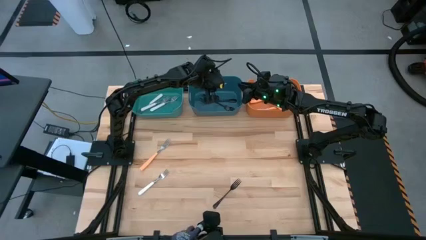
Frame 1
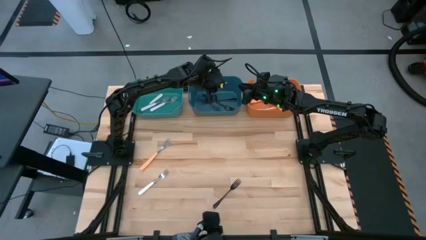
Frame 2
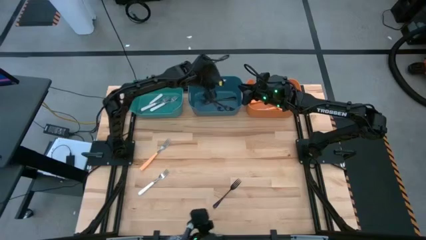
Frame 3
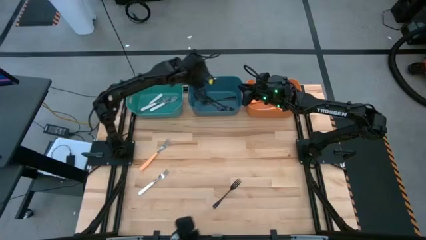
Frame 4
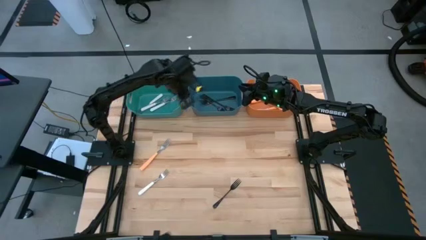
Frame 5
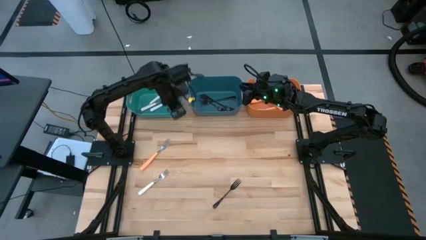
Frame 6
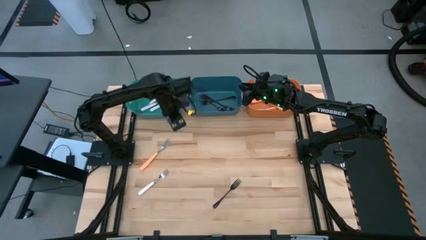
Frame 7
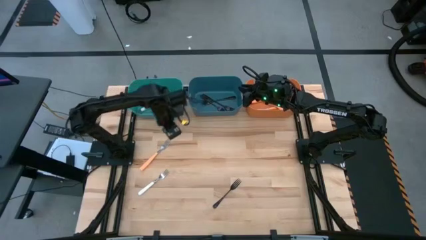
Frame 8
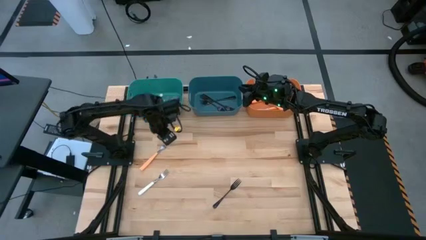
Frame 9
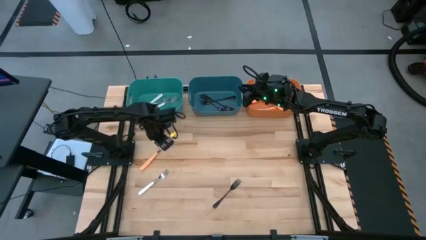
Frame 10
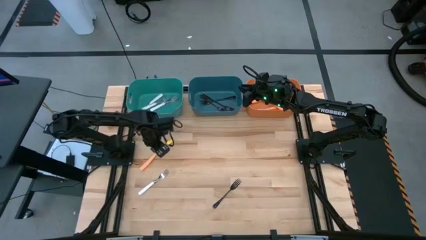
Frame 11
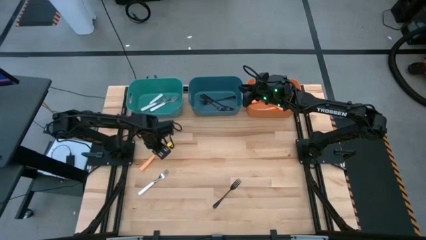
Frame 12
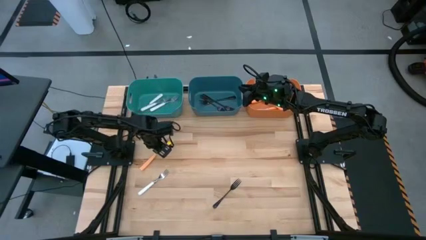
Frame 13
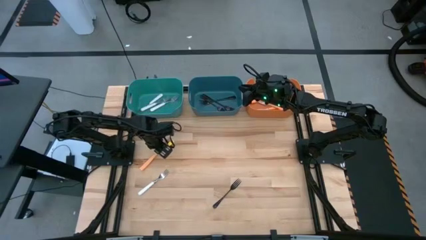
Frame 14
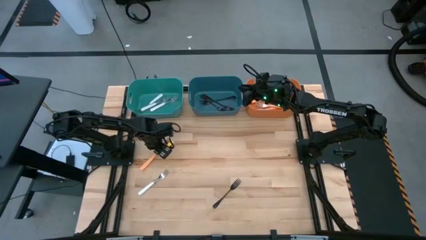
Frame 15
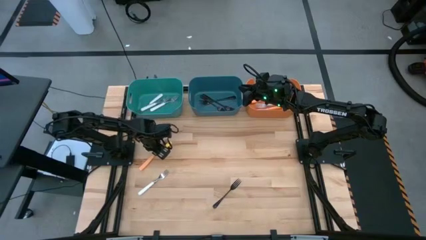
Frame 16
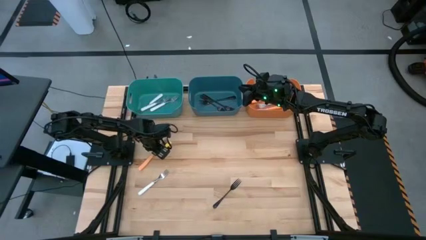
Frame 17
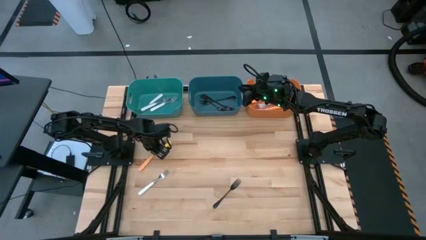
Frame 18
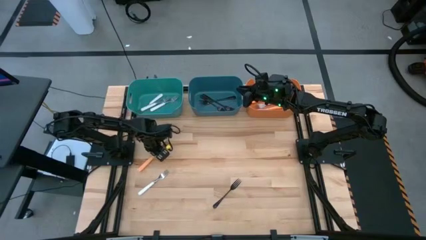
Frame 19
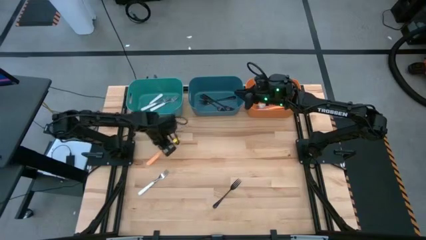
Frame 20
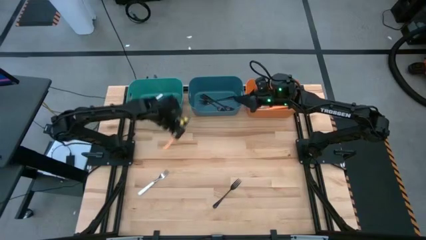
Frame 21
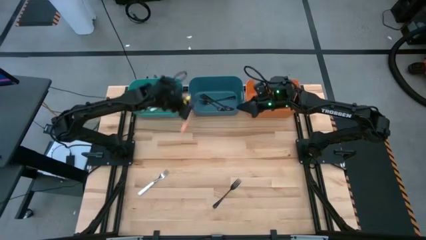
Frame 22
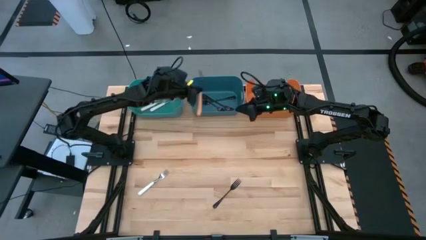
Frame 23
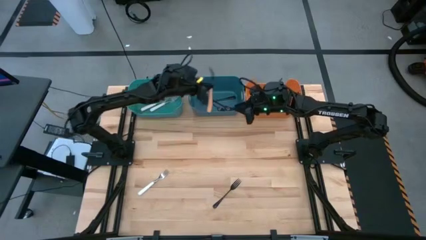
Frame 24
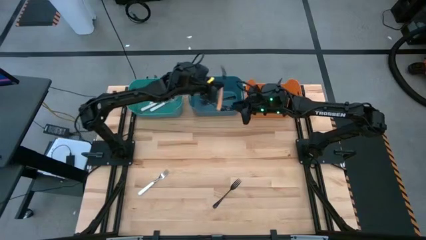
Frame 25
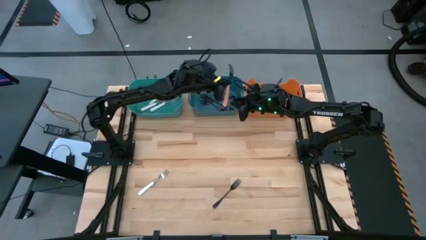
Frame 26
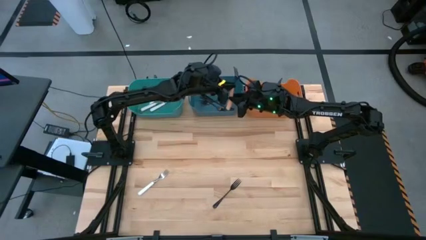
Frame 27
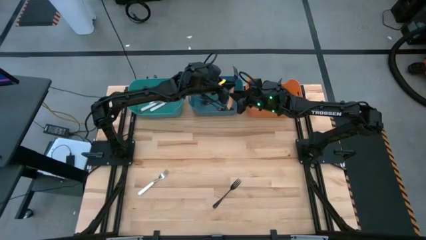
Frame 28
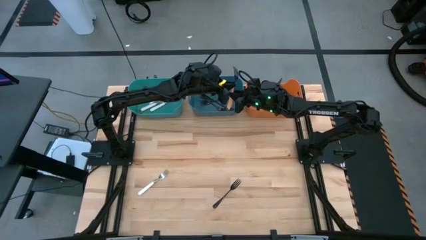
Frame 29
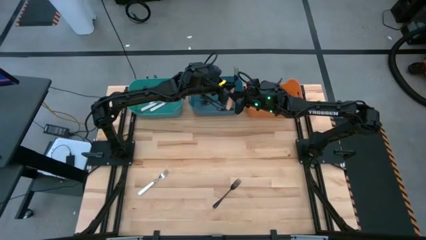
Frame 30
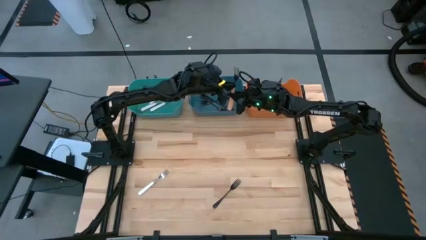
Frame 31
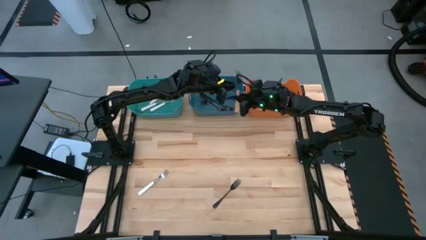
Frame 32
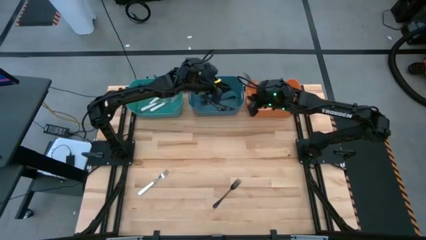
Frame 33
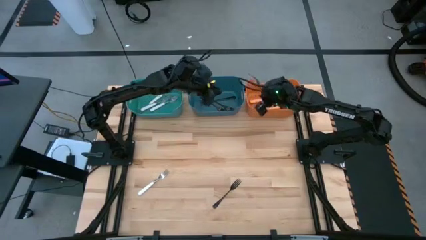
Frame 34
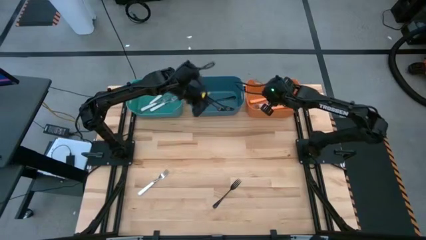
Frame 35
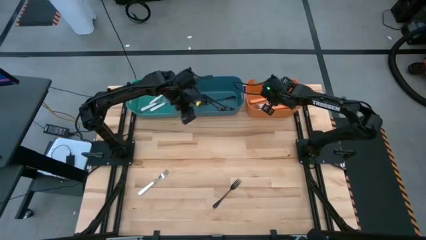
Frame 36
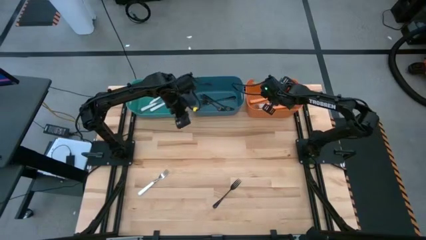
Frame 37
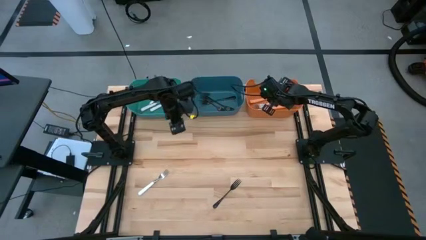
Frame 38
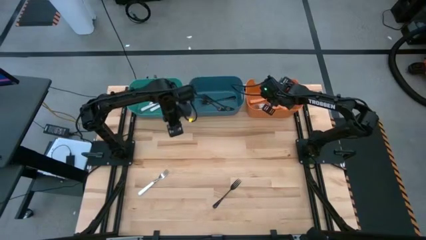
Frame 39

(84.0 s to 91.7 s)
Task: Sort silverware by color (type)
Put the yellow fork into the orange bin

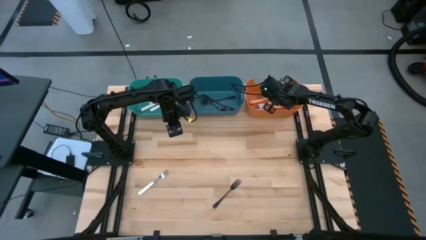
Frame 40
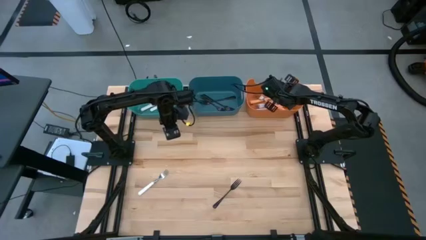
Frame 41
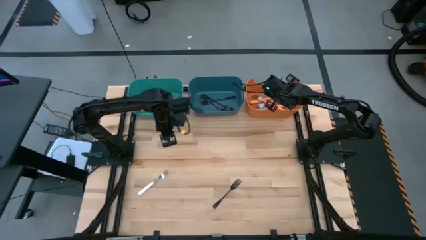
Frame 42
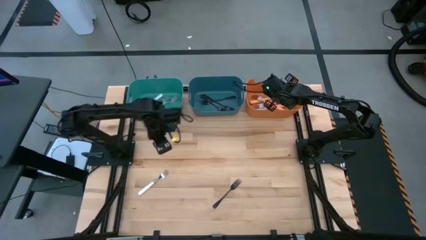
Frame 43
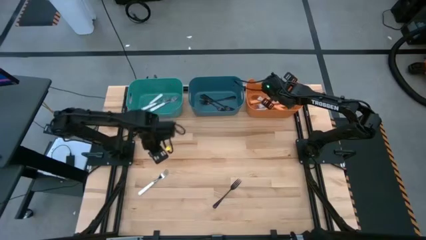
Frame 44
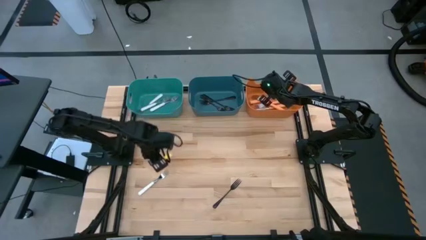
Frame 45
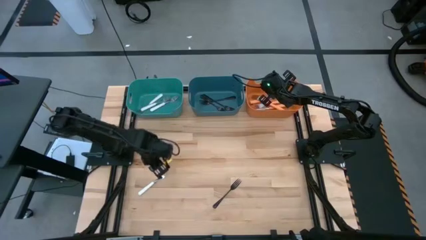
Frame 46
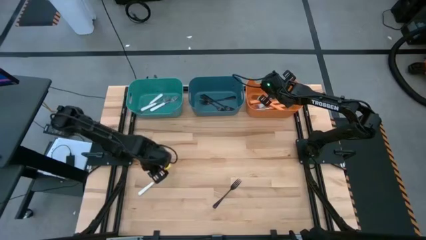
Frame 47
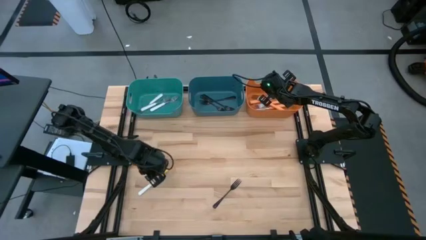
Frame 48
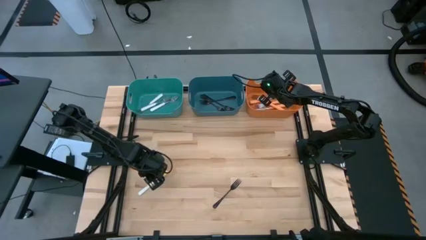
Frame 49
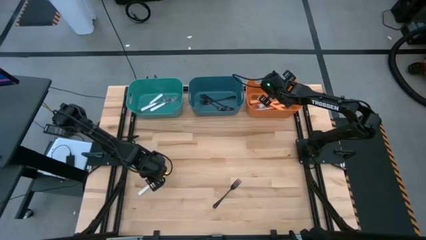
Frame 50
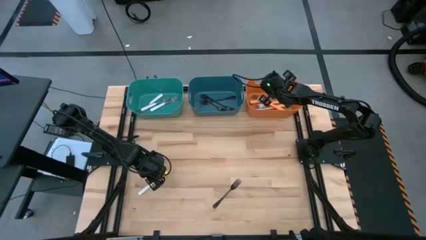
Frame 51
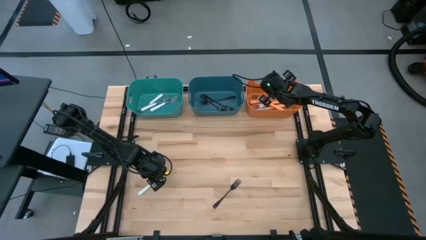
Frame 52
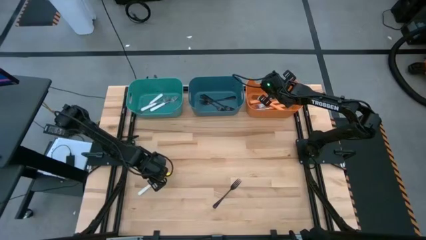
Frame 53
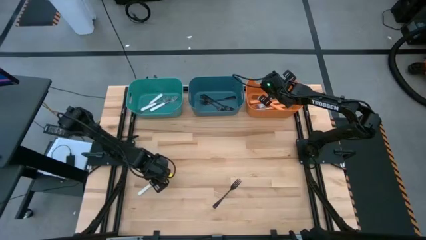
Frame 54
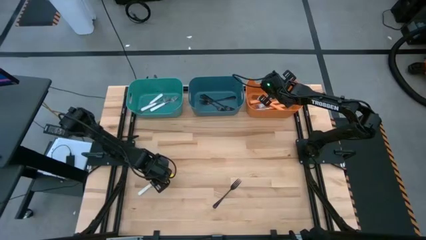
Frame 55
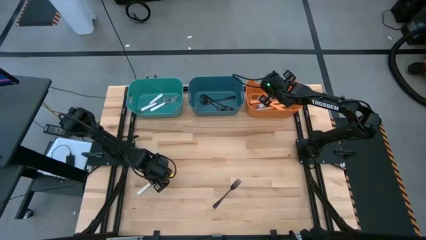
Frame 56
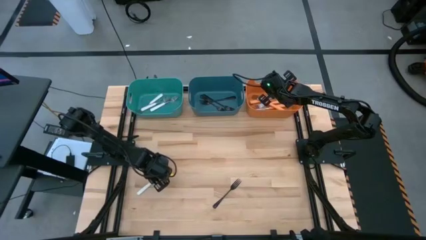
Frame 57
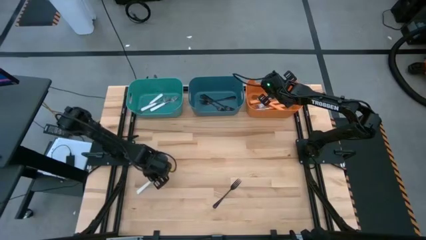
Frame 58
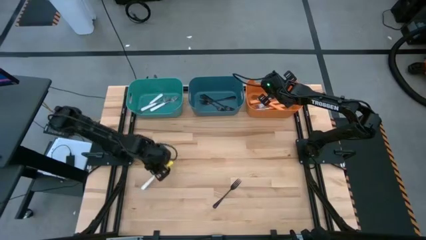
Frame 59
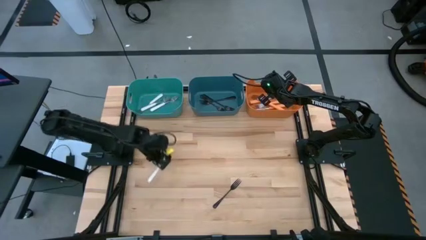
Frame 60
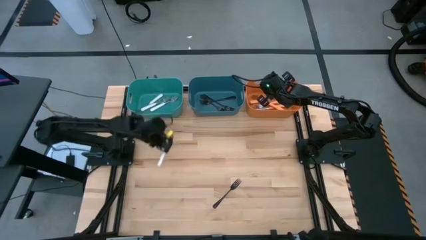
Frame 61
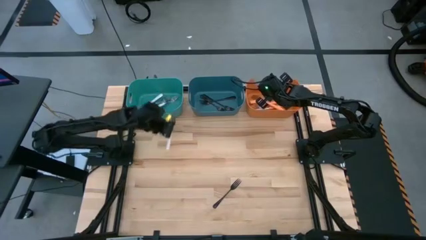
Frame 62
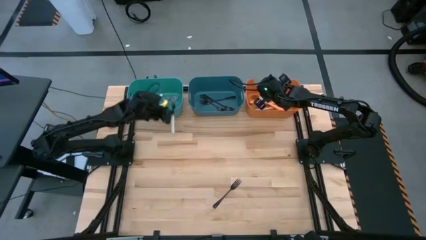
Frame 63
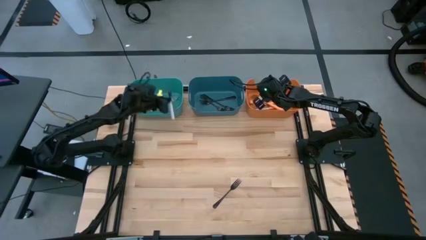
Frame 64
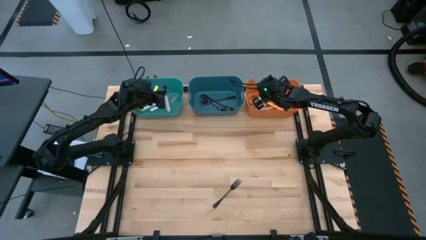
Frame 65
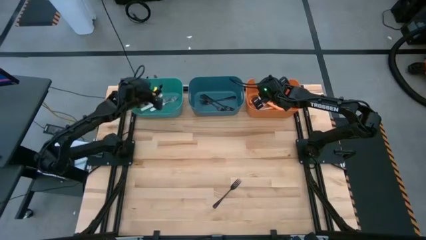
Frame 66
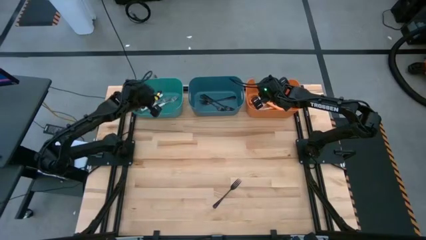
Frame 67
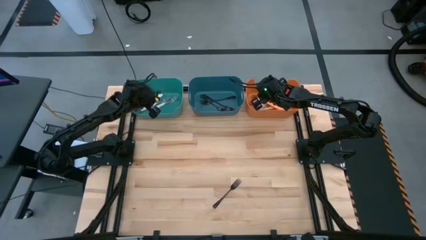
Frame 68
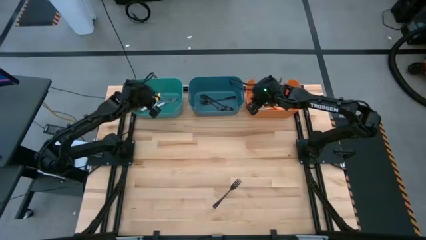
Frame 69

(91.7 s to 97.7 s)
Put the white fork into the green bin
